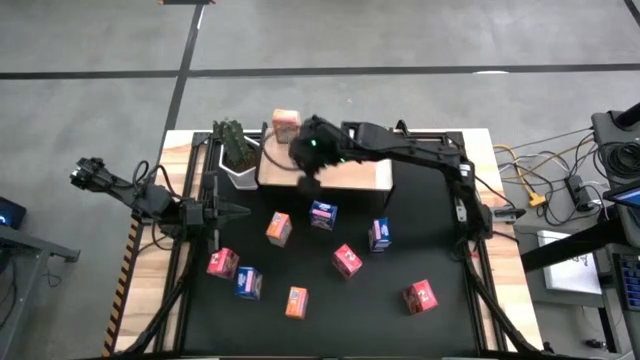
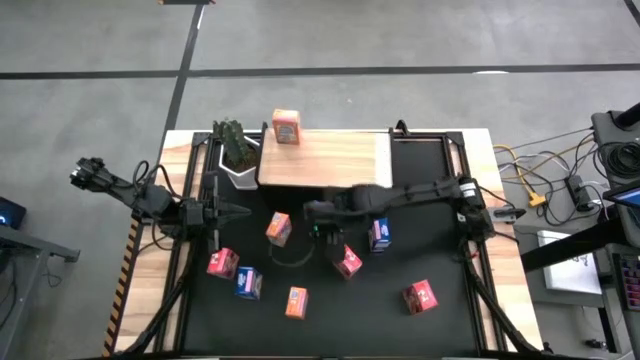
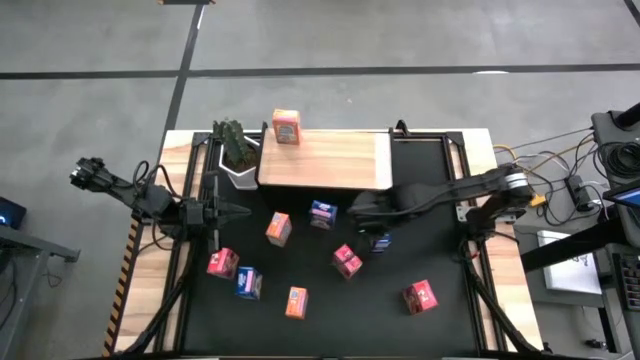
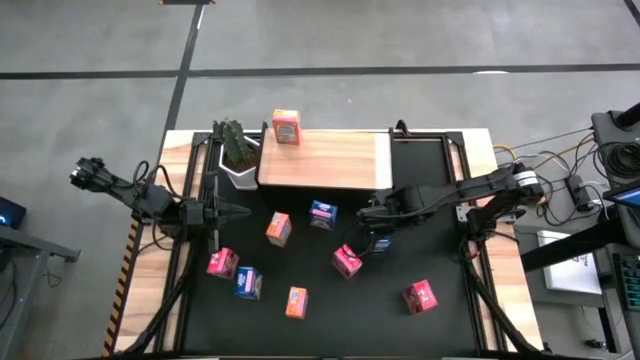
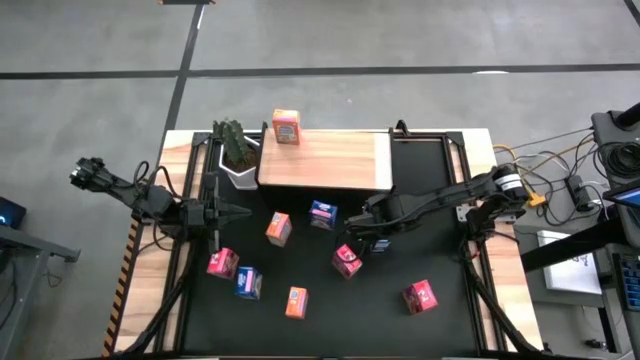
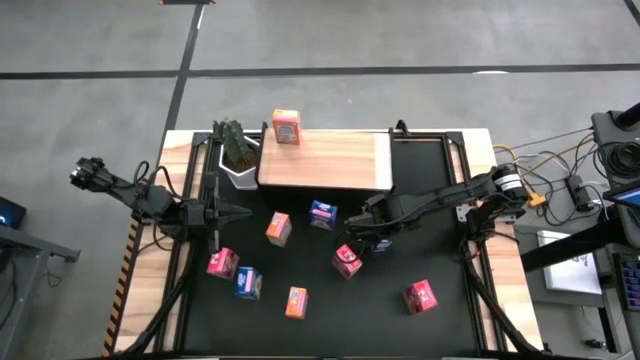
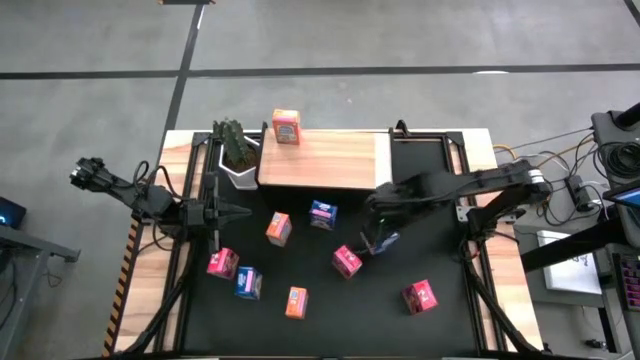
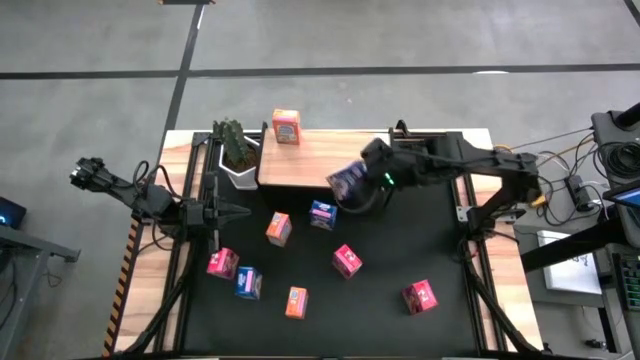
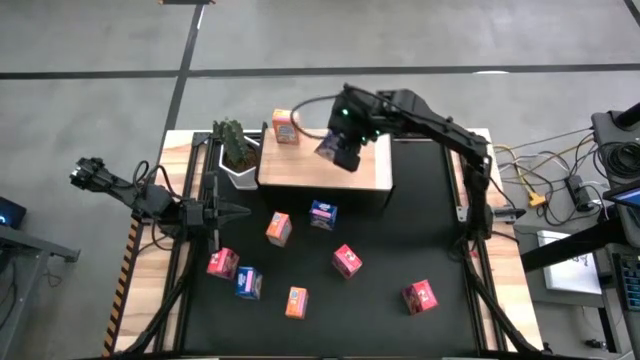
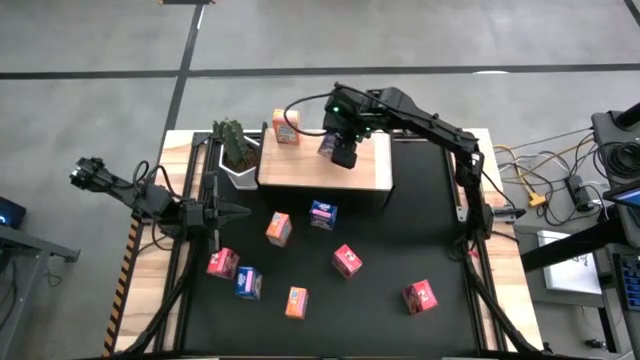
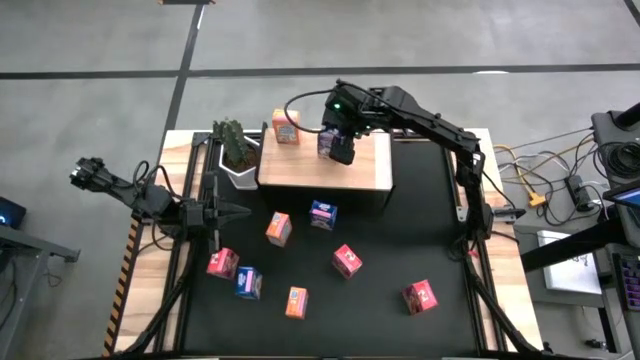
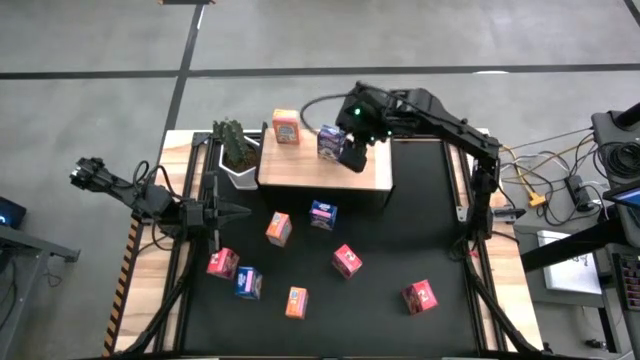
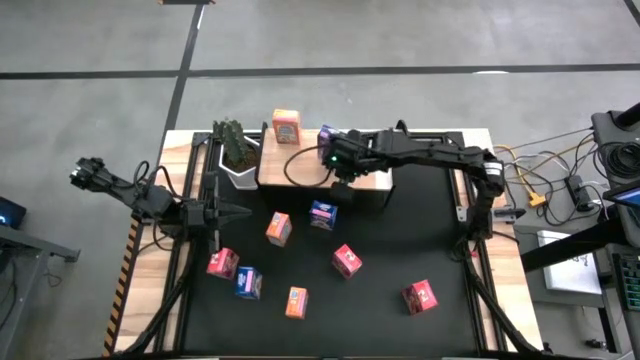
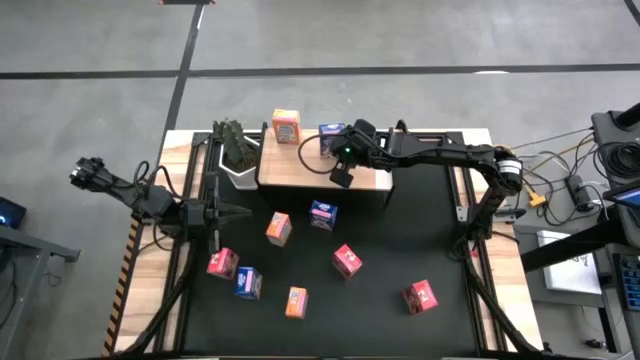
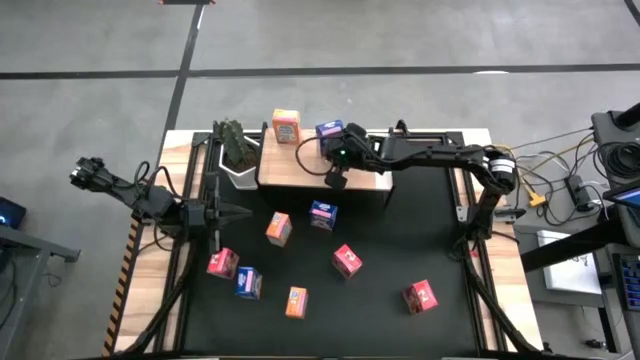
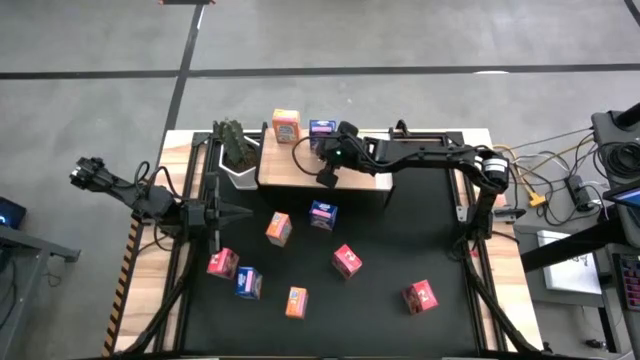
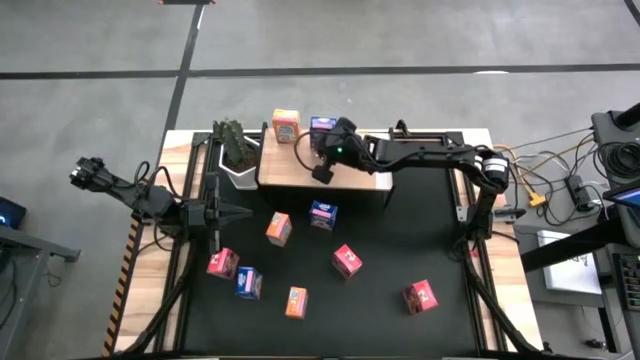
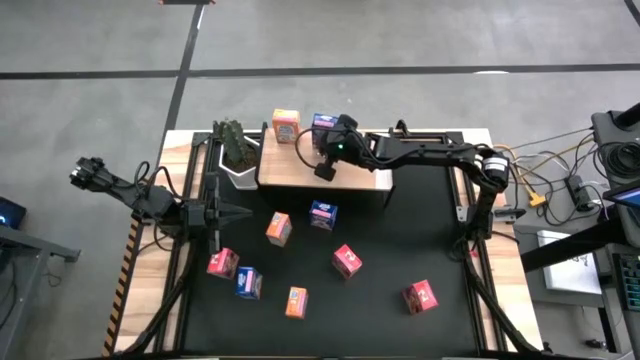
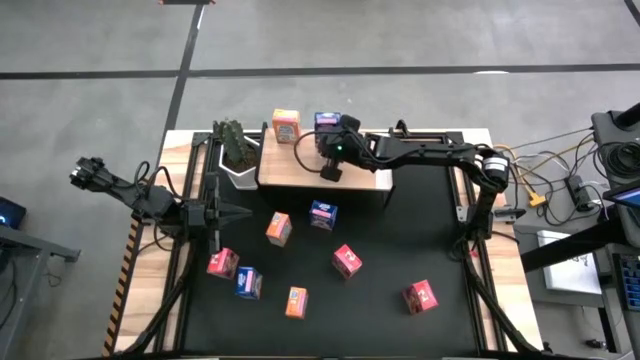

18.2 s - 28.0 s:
Task: Stack cereal on shelf
Put the top right blue cereal box on the shelf

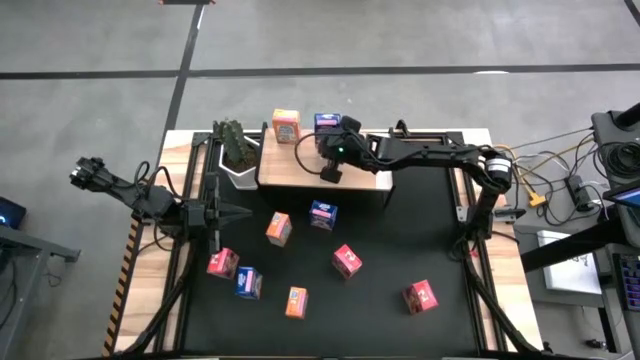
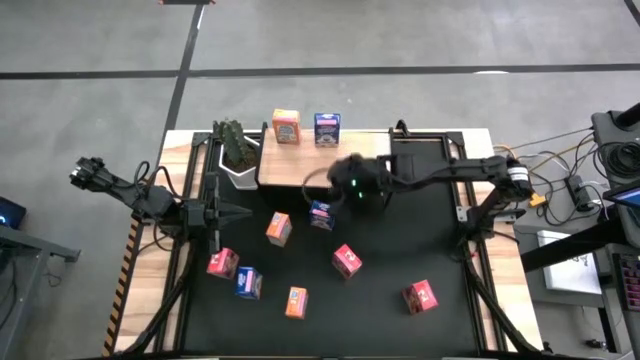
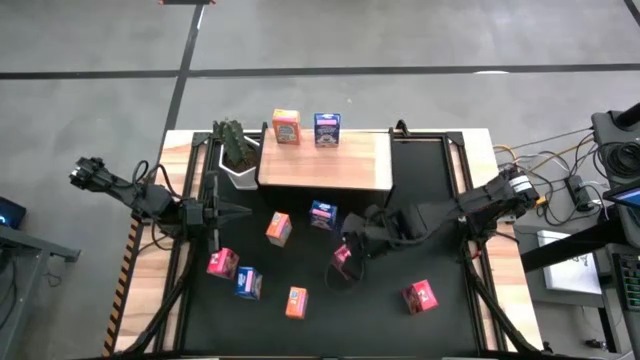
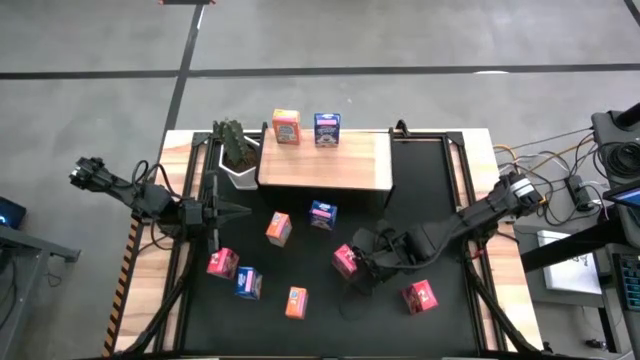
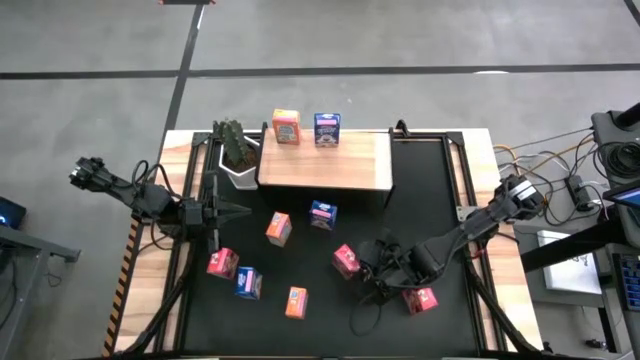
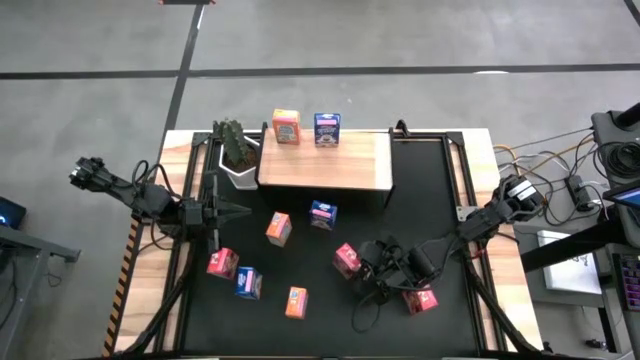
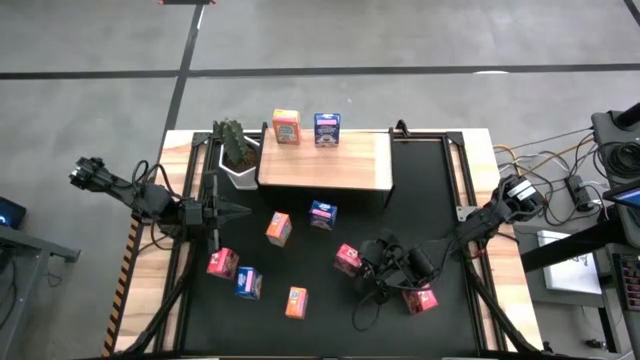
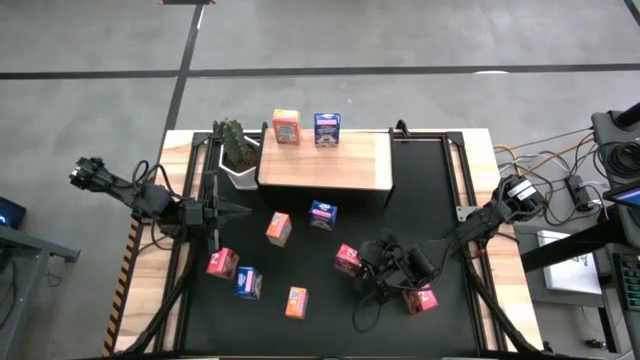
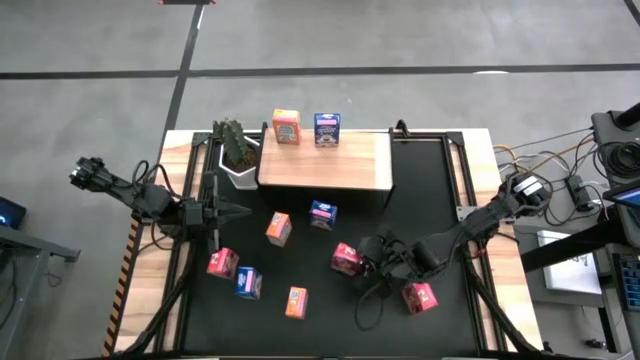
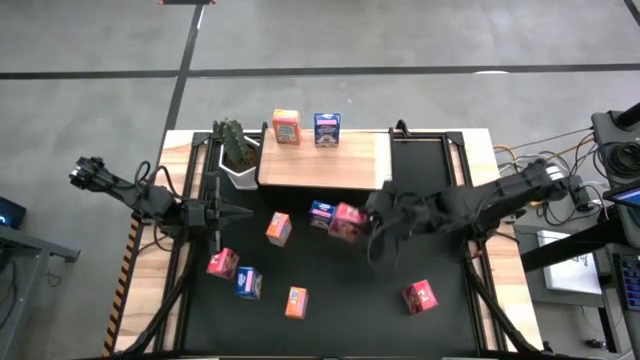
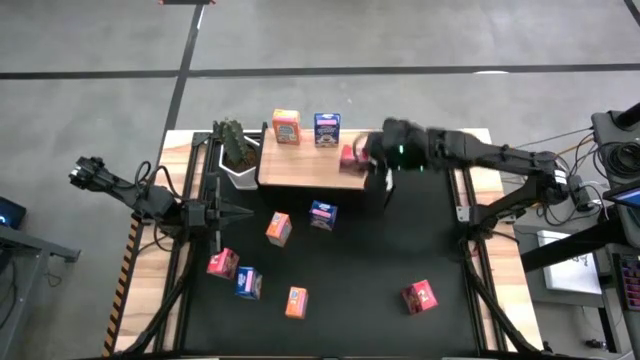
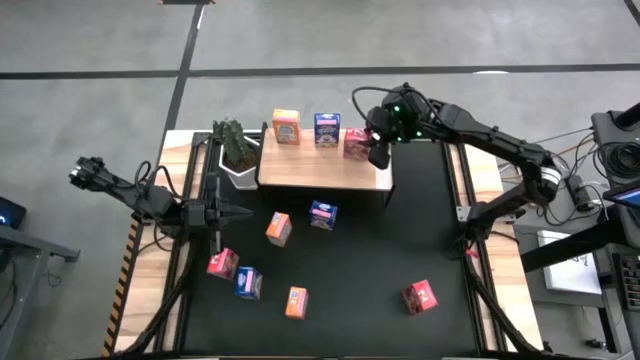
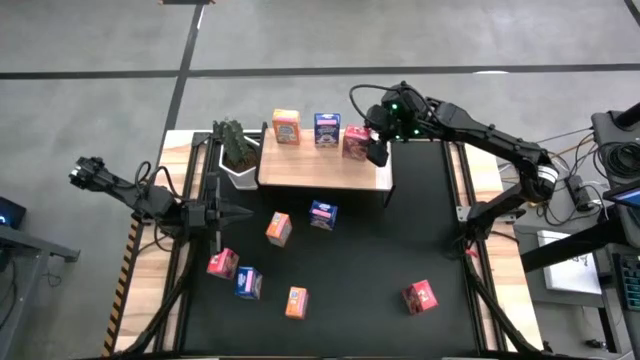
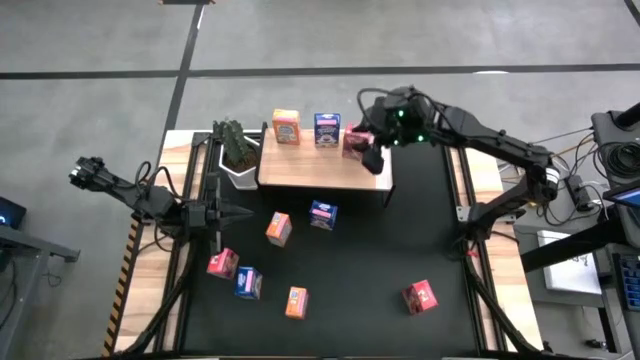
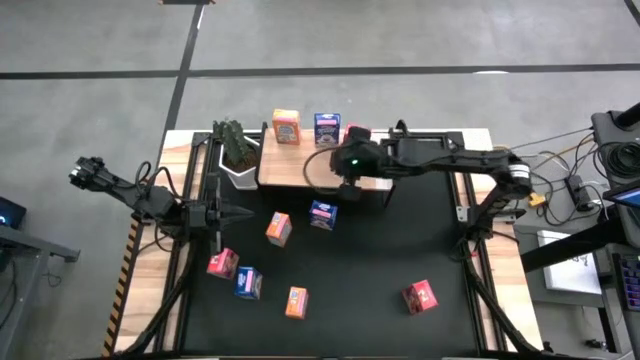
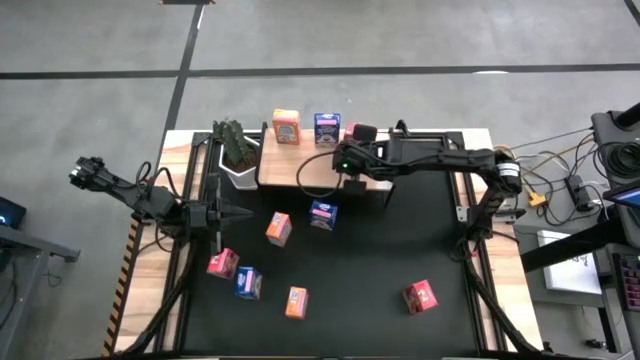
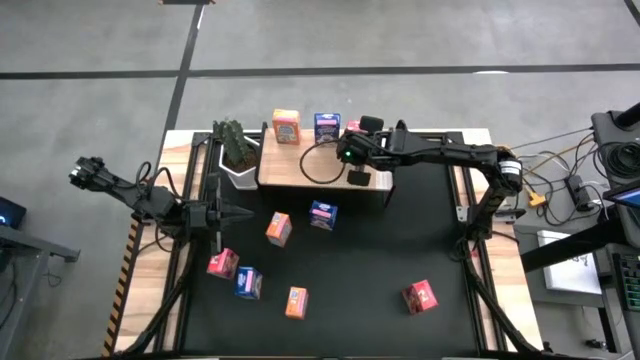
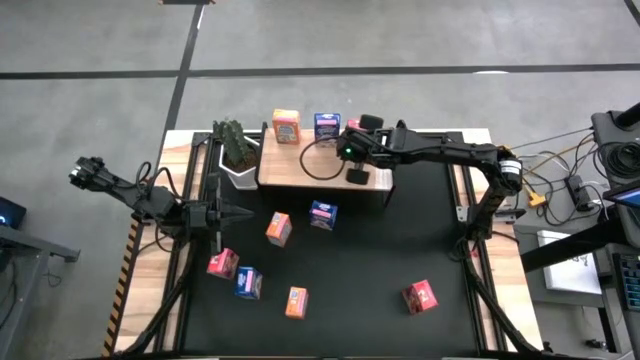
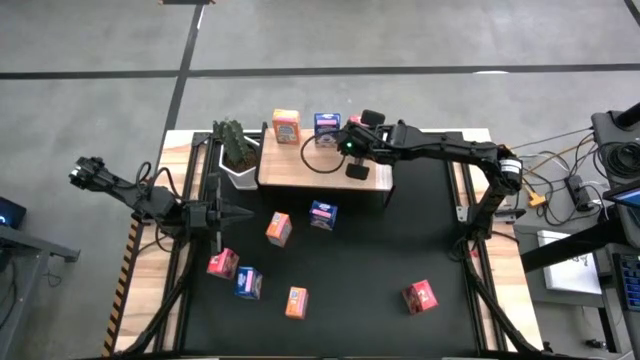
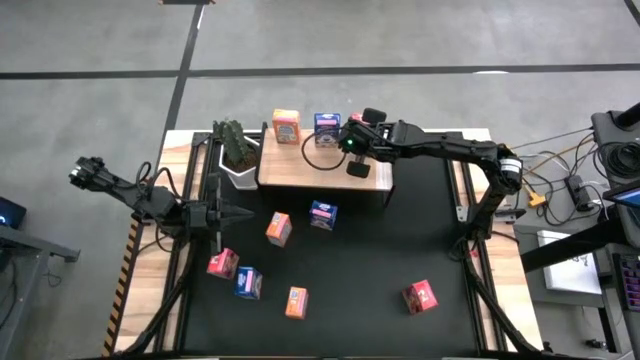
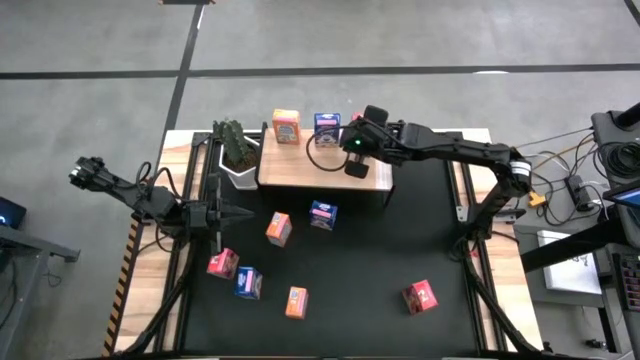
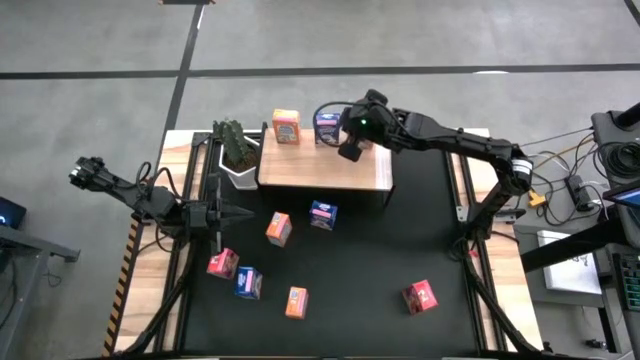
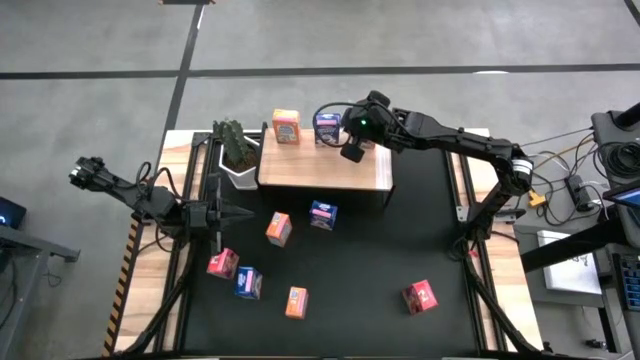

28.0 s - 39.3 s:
Put the middle red cereal box on the shelf
